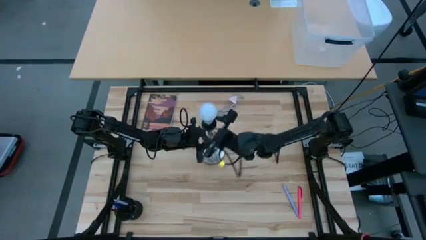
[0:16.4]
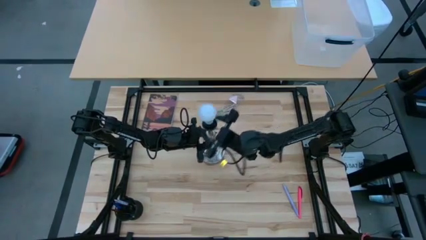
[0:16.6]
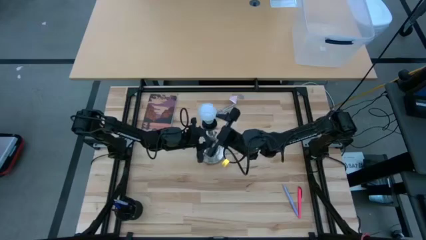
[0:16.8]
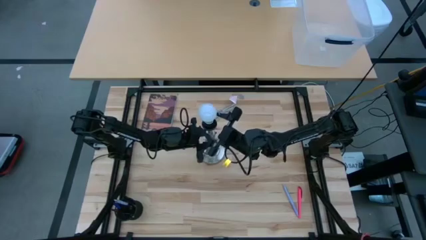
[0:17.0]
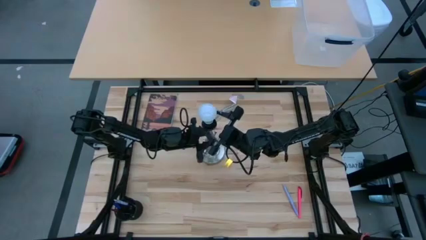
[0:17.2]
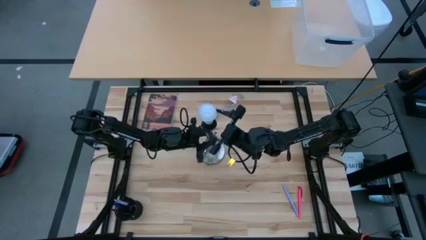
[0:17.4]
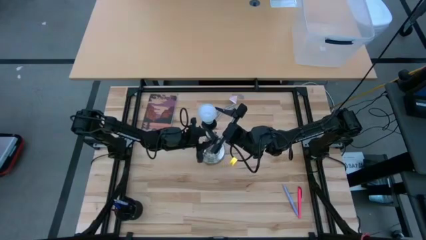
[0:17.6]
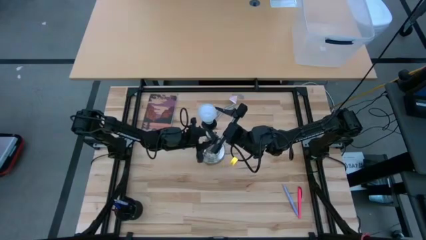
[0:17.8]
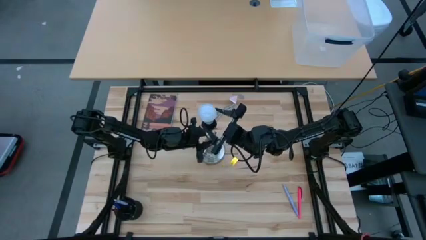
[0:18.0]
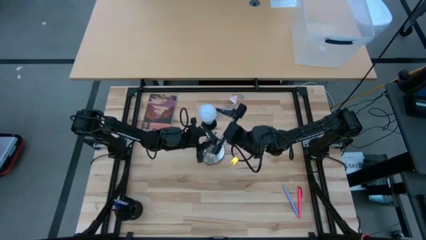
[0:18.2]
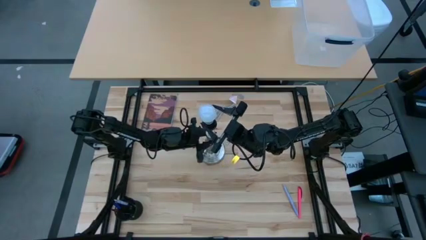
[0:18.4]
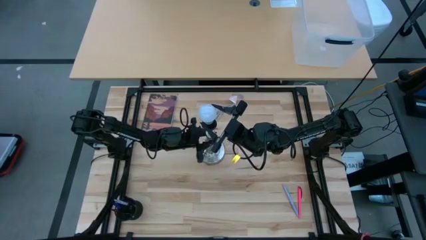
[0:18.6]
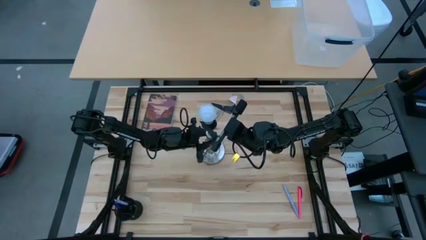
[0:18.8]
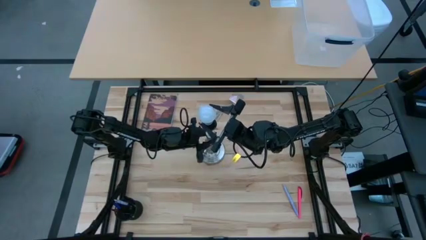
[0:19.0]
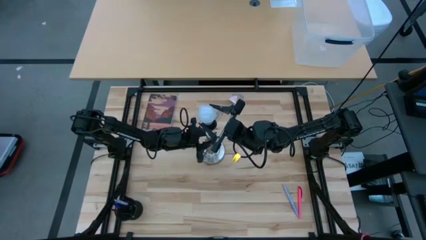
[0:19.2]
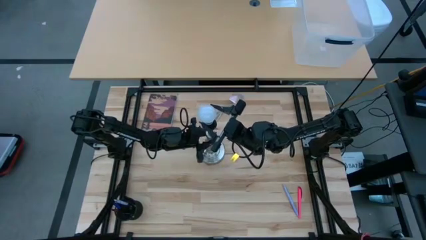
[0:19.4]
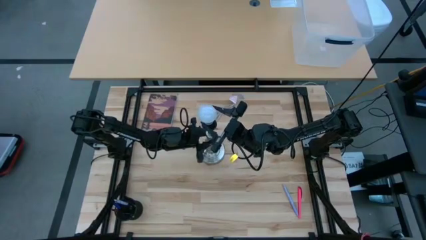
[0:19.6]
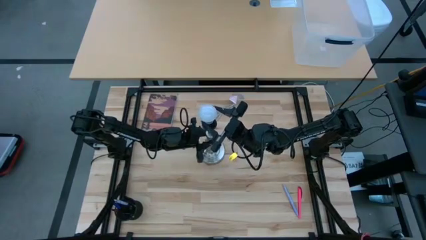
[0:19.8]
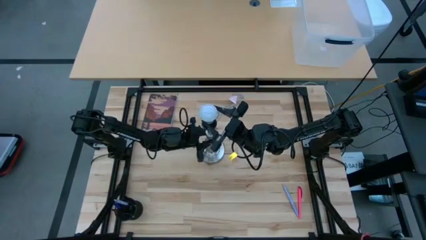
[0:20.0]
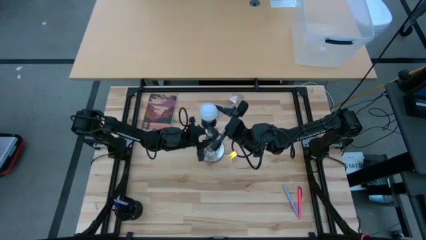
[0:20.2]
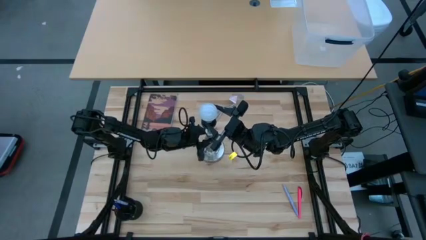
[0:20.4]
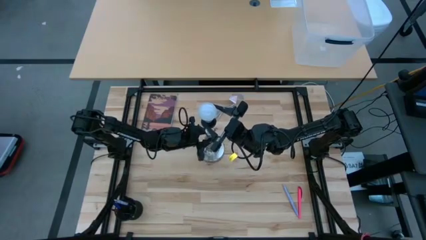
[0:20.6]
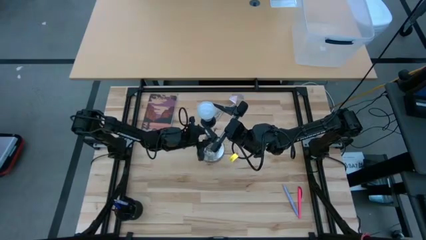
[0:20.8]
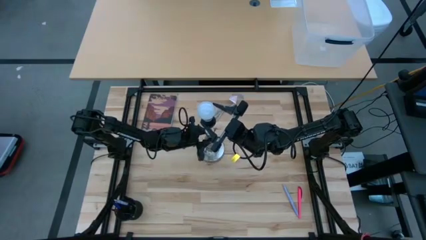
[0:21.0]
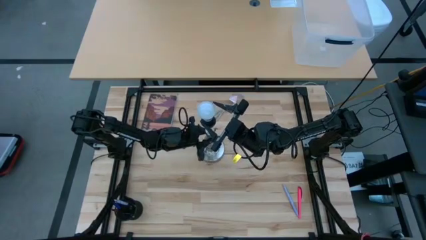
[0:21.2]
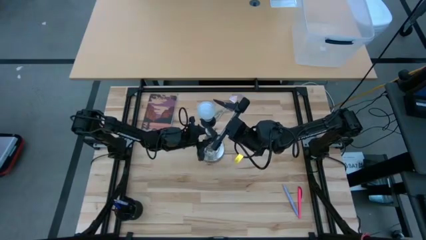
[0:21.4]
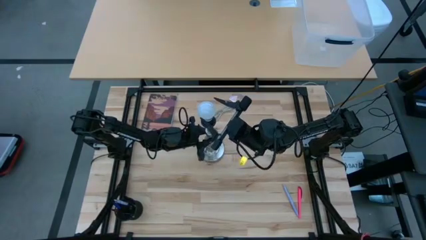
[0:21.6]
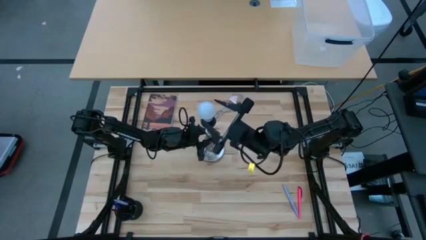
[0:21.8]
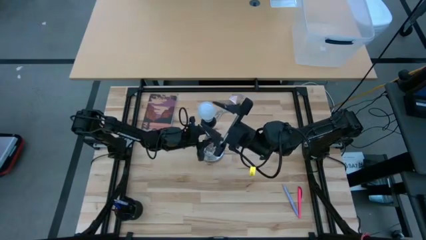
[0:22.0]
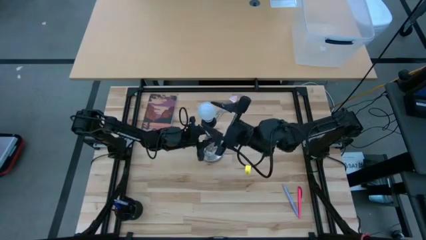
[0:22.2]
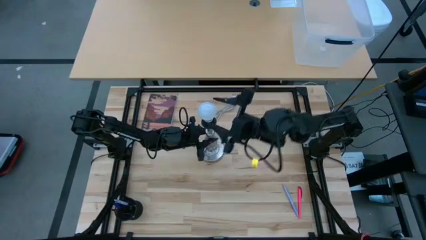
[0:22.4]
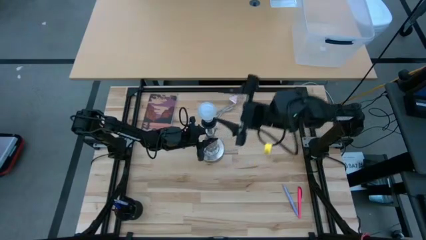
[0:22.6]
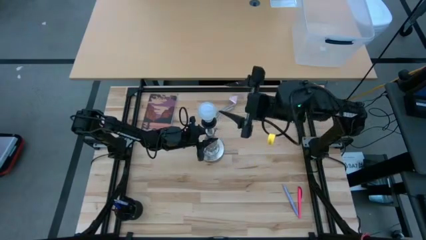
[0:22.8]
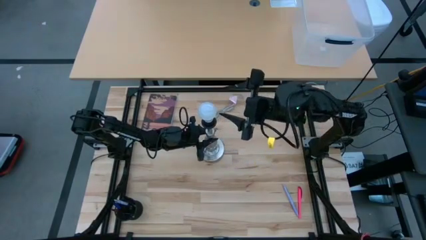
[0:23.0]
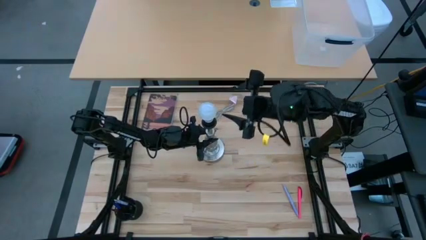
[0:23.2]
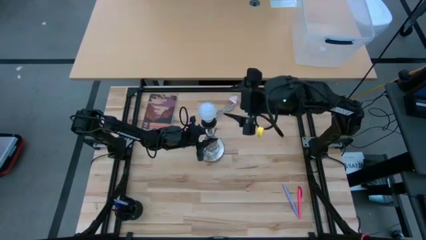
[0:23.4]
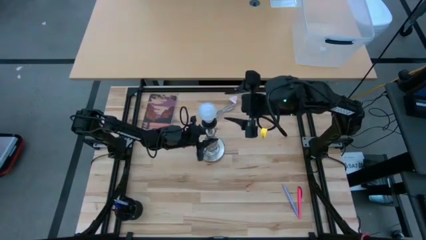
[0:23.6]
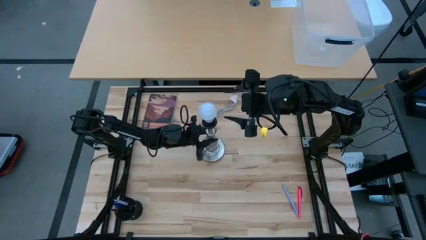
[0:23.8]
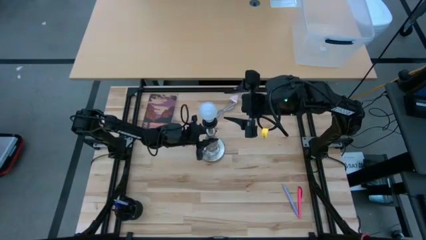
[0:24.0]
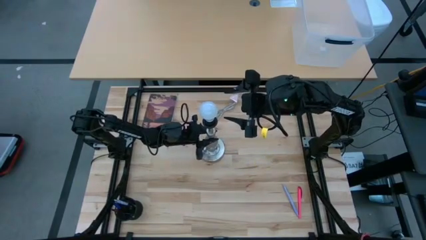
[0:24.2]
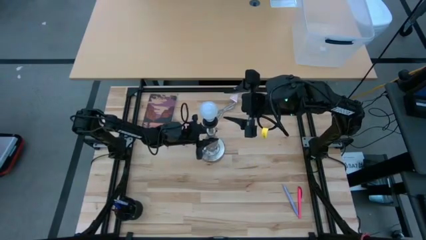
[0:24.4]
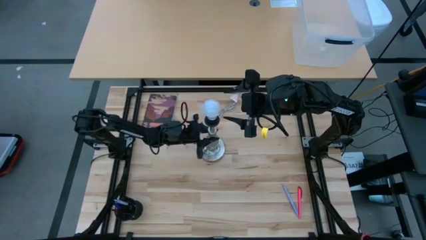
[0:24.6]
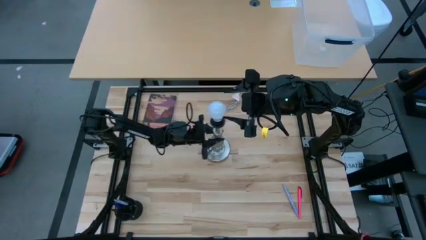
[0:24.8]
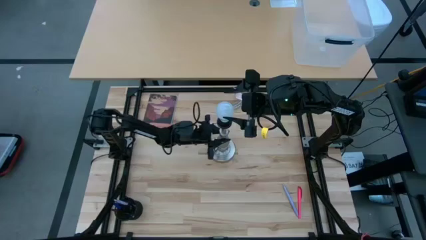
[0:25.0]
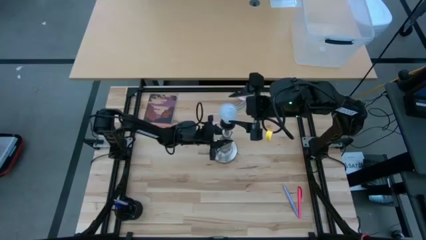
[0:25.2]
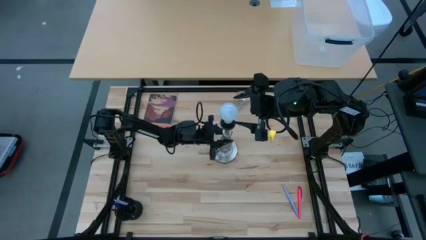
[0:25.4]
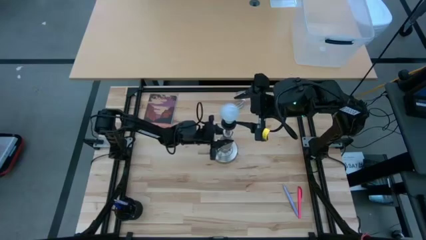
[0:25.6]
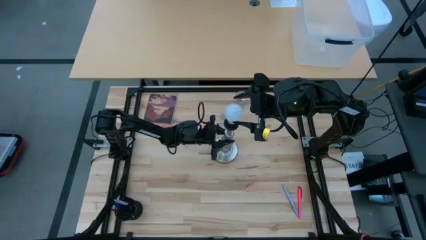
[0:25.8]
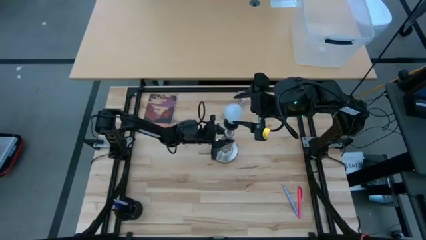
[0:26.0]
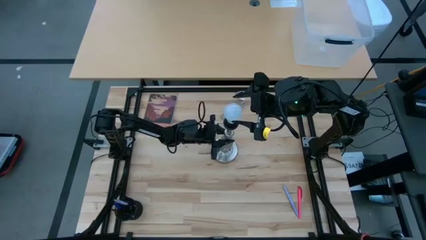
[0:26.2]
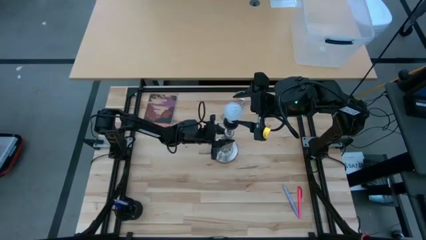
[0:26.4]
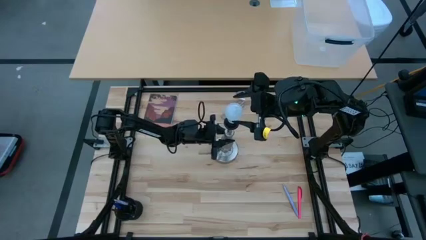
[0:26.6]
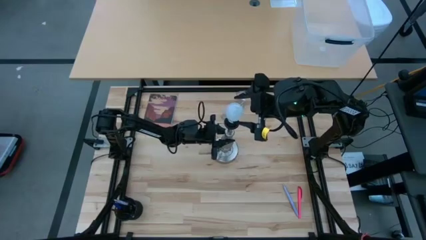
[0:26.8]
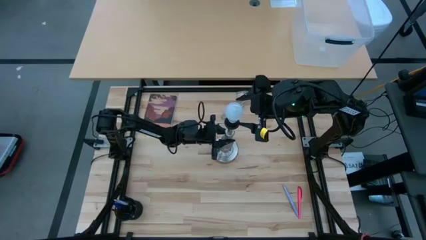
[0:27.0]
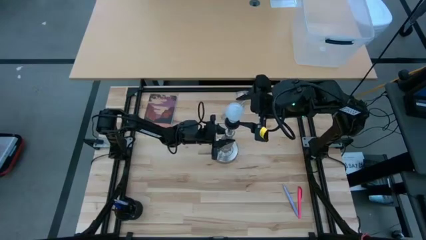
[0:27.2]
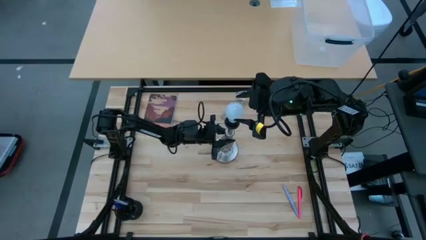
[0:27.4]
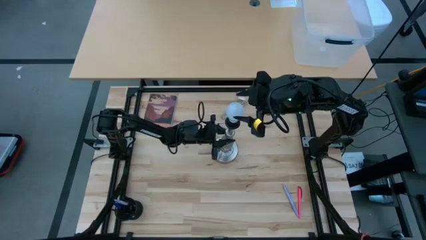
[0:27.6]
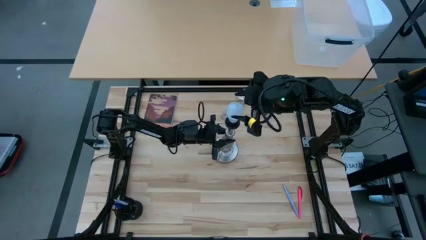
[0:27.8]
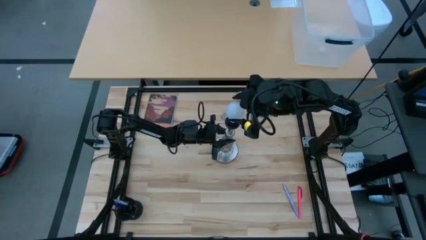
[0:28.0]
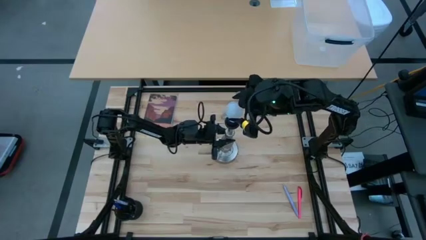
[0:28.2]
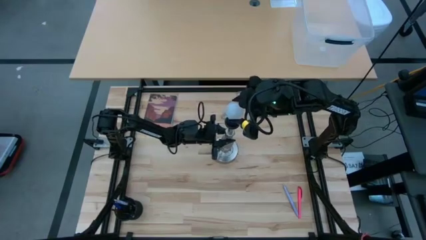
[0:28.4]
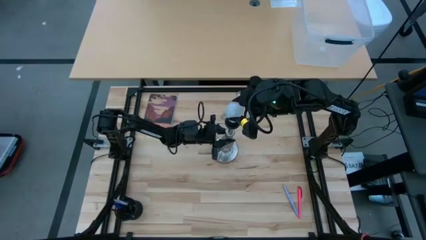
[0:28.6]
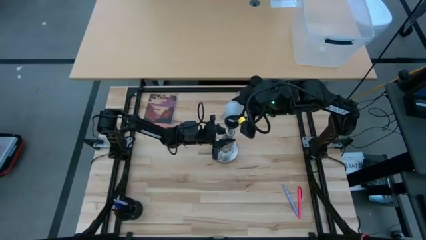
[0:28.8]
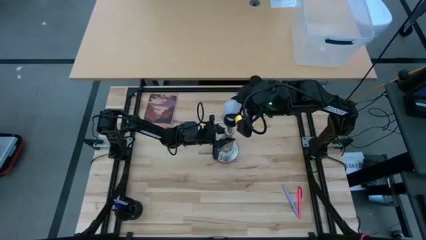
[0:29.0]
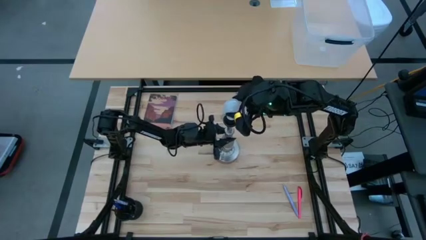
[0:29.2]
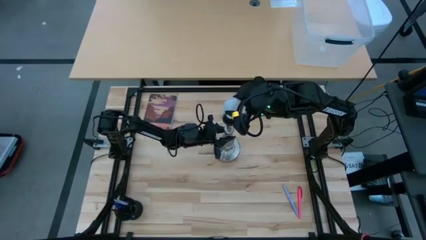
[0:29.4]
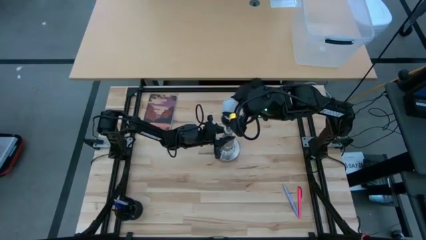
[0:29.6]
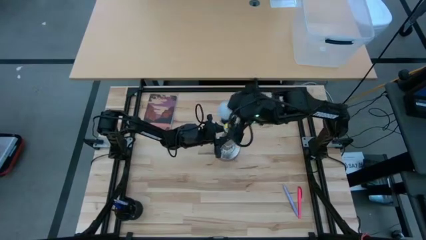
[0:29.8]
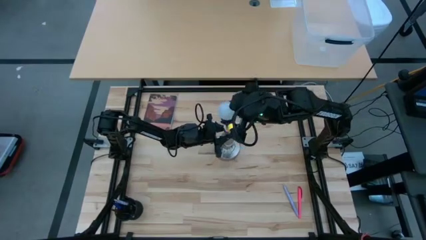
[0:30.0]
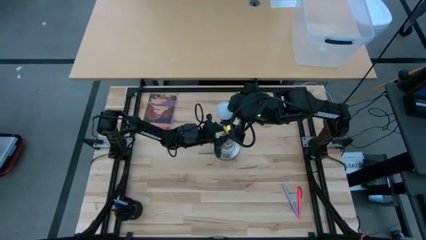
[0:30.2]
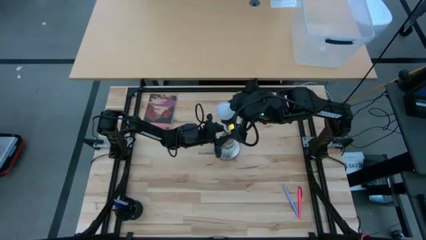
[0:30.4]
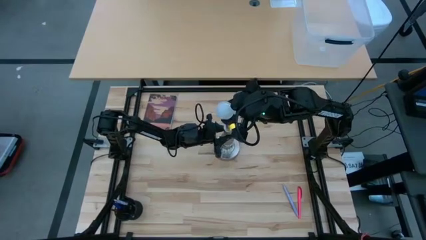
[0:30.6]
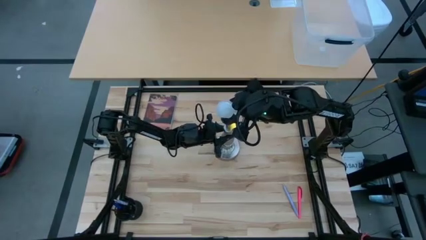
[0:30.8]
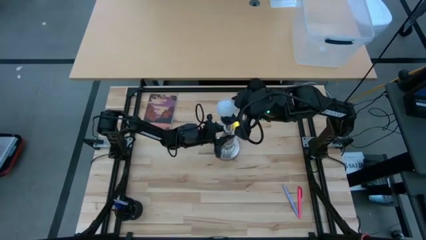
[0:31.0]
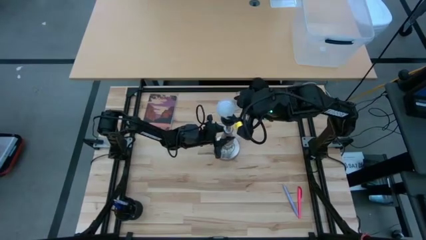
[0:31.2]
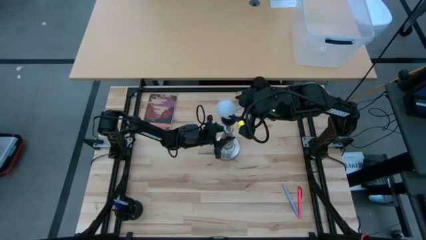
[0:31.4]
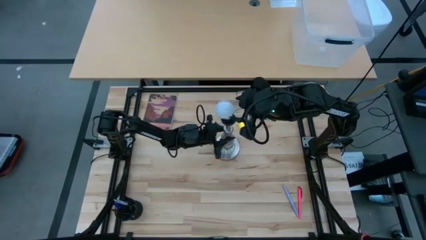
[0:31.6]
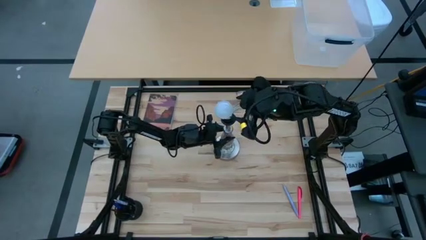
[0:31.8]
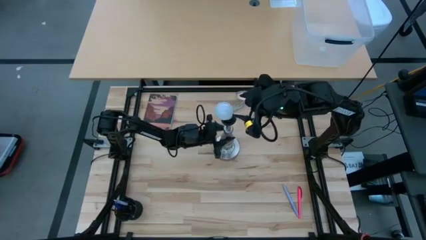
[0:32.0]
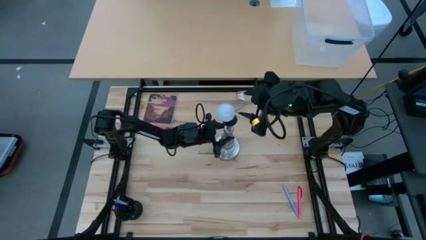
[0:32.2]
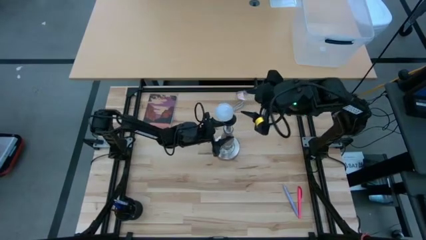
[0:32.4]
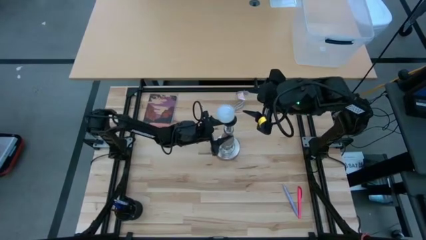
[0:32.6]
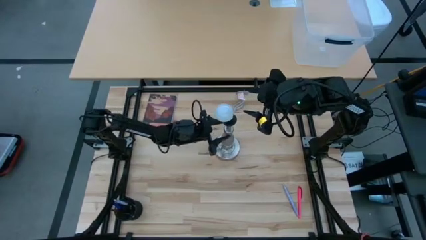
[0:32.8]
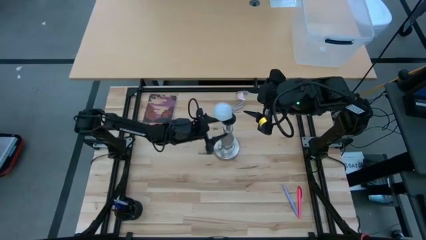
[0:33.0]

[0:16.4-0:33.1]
Task: Screw lightbulb
Insert the lightbulb into the silver lamp
